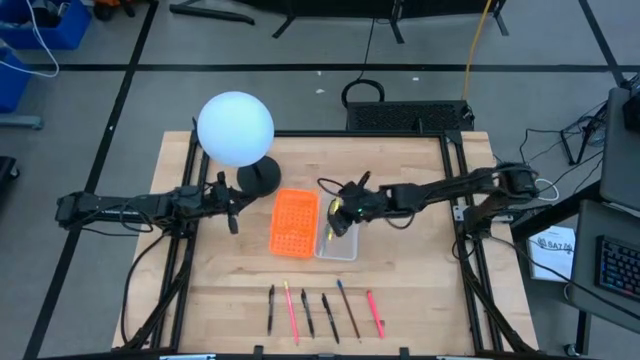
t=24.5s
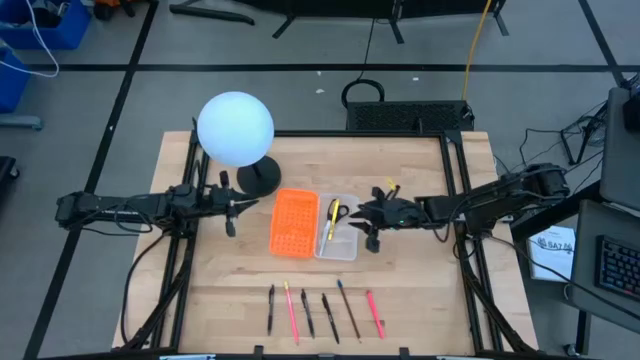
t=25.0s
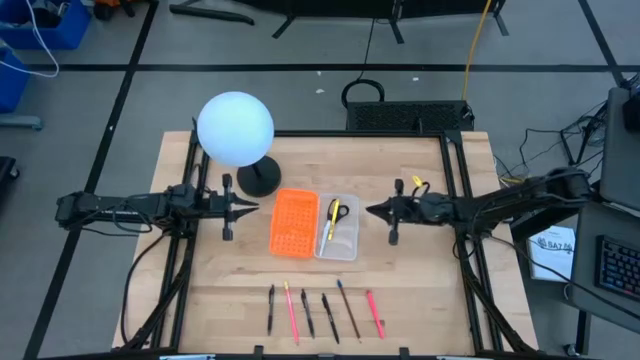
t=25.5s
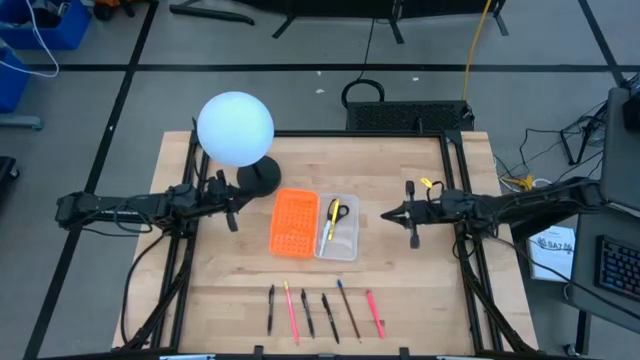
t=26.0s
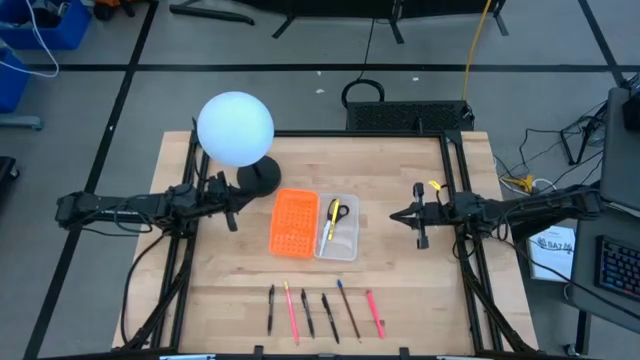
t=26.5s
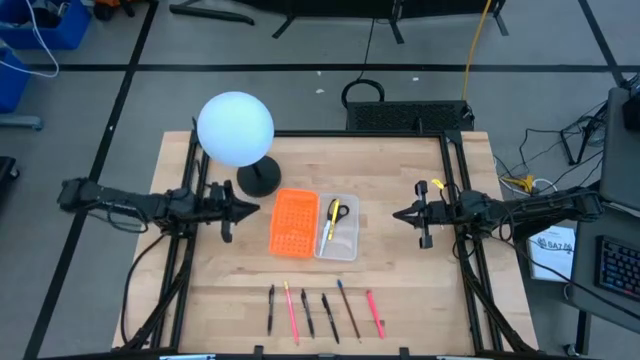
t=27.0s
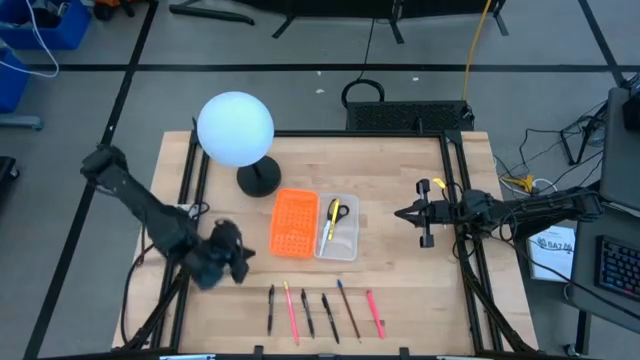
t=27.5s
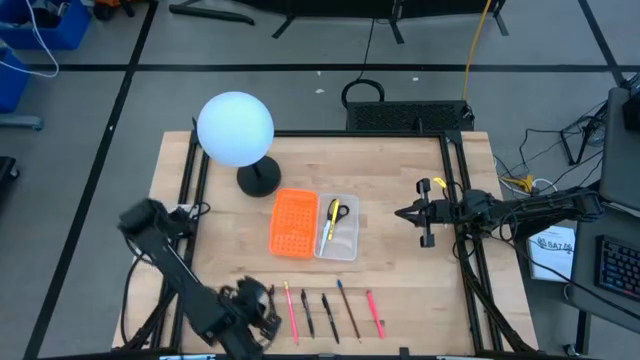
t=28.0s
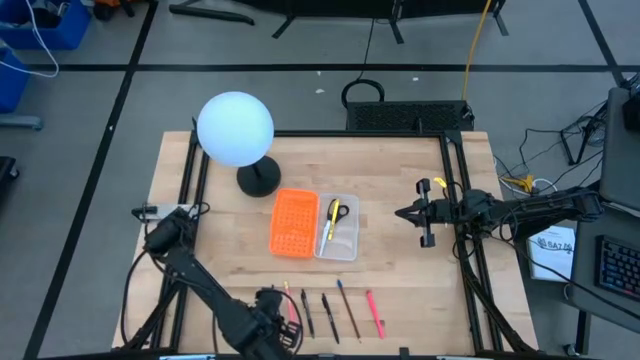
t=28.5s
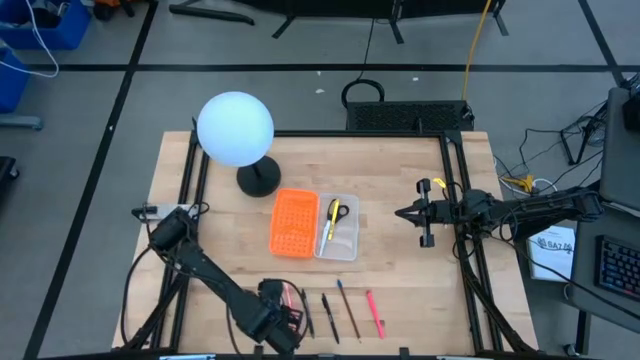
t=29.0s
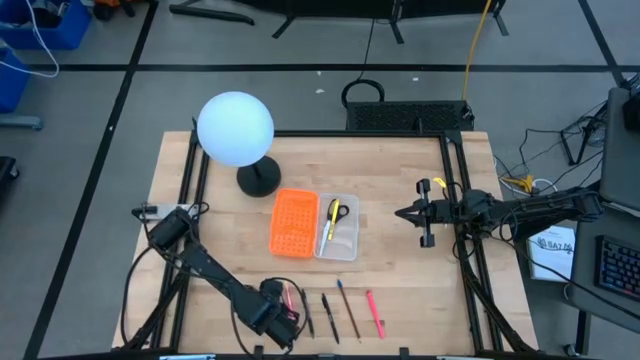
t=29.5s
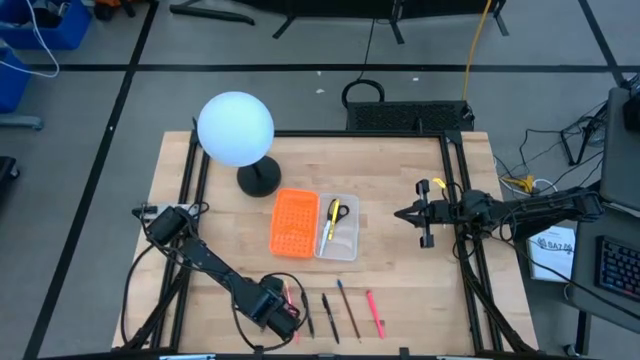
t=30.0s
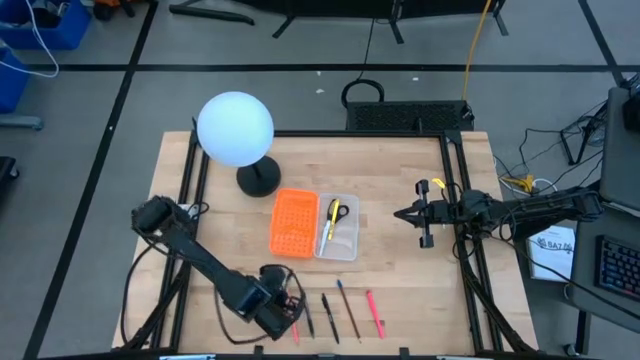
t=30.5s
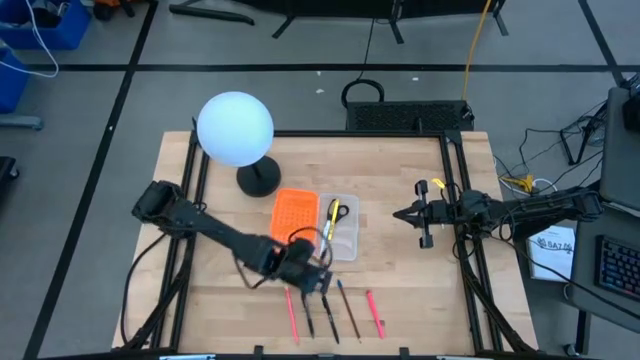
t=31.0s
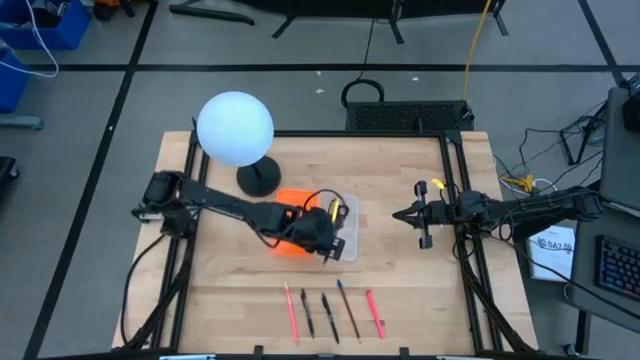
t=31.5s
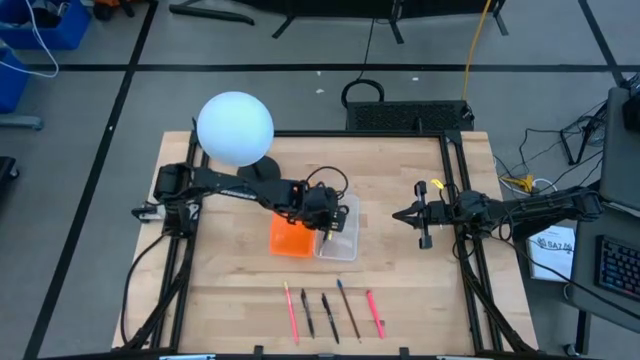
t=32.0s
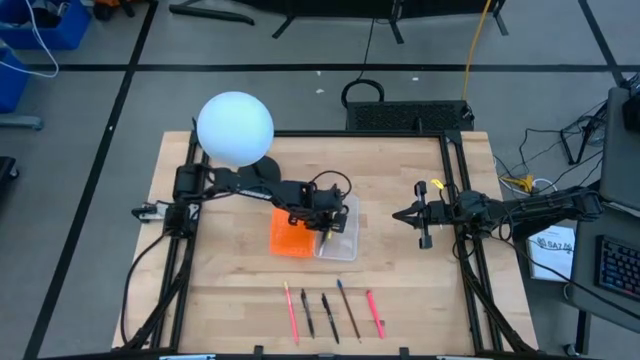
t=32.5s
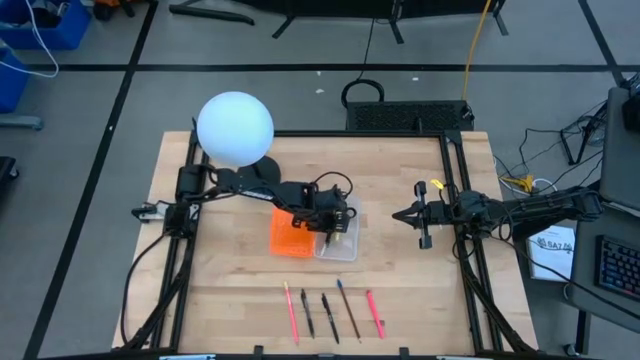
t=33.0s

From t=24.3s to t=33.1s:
Task: Pick & place school supplies into a supply box
Put the left transparent pen into the orange supply box

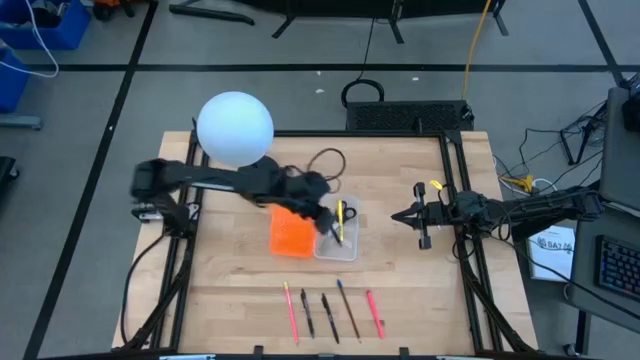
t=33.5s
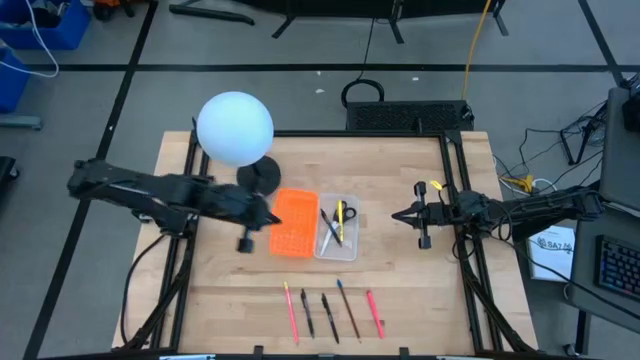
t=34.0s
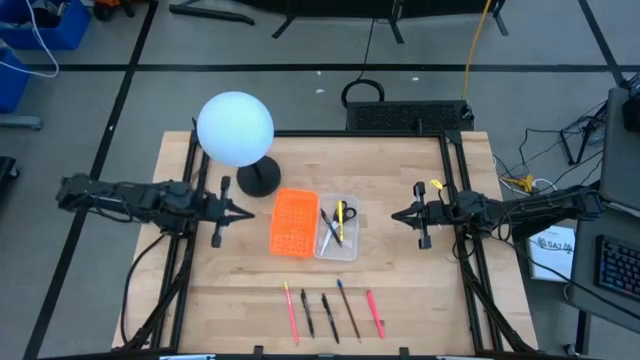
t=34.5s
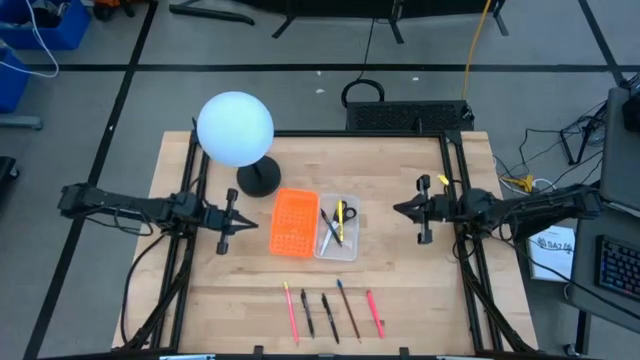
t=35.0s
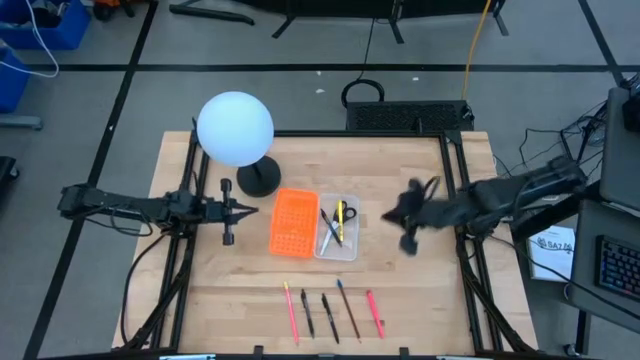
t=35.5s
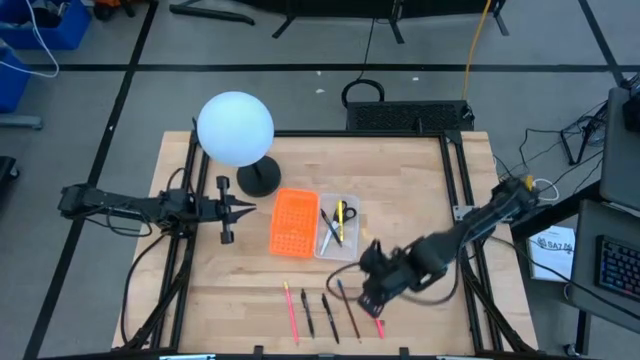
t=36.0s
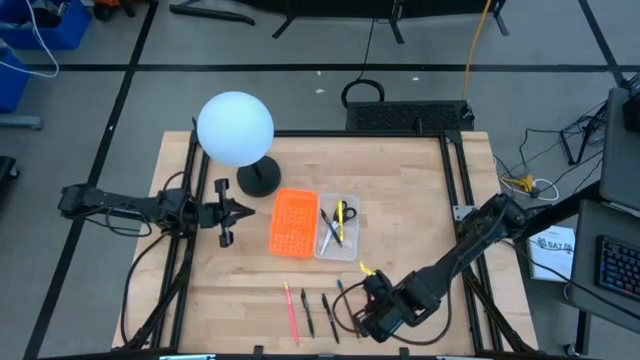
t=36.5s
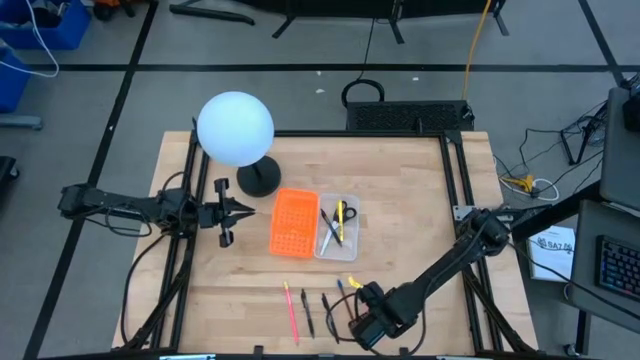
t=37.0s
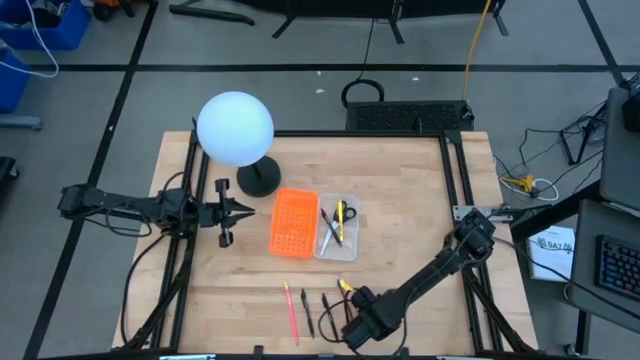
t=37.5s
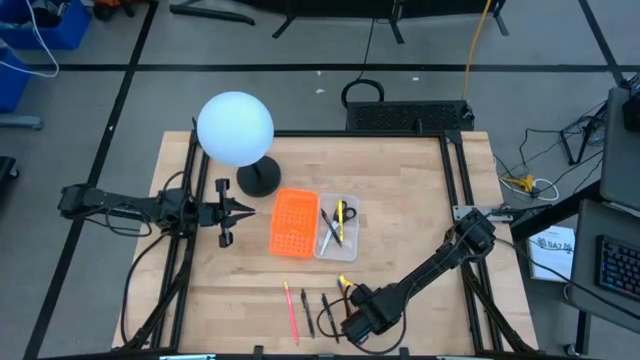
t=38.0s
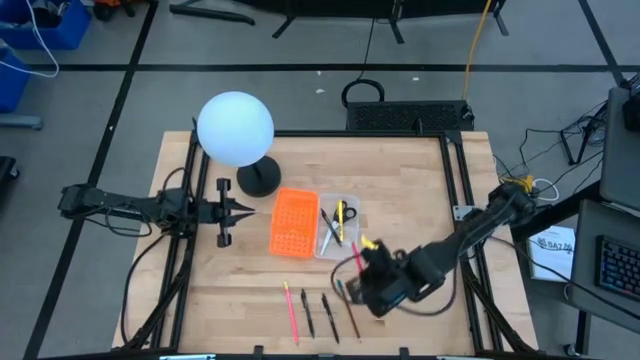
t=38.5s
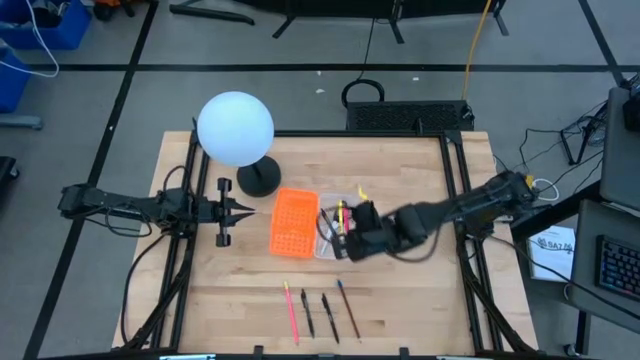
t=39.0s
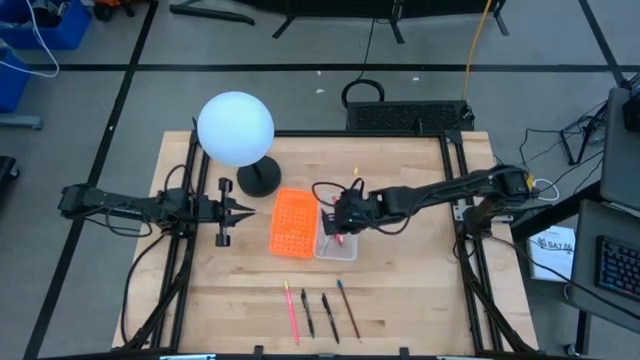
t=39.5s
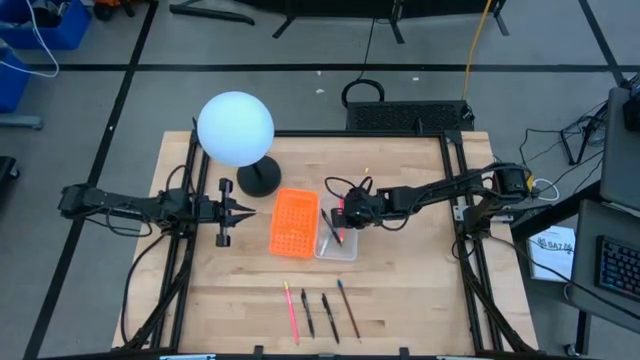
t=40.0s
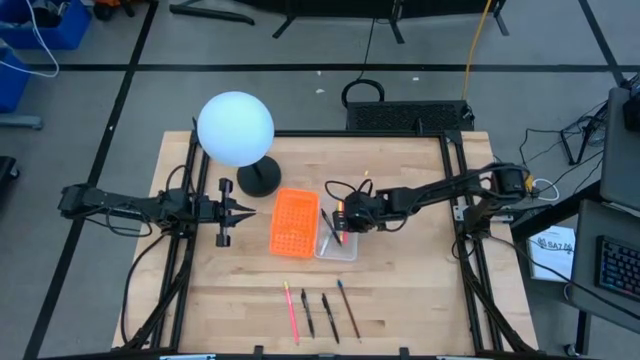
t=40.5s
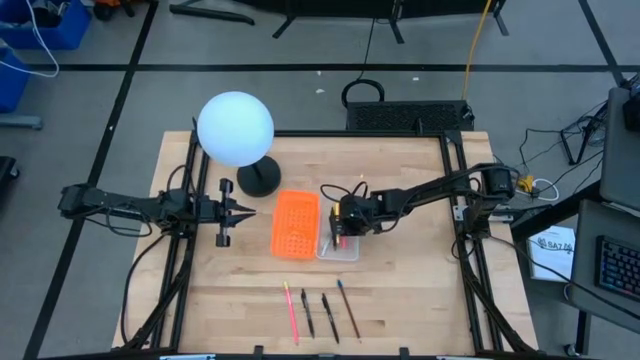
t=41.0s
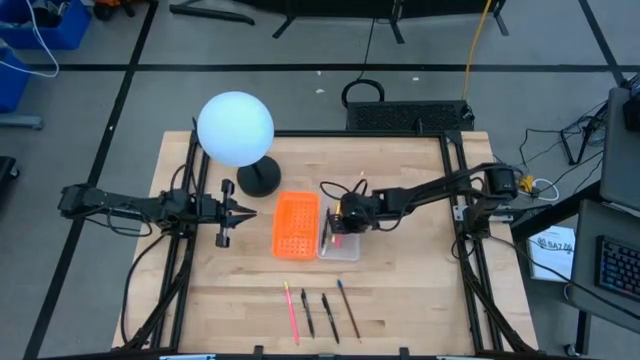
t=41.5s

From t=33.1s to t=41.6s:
Put the pink pen into the orange supply box

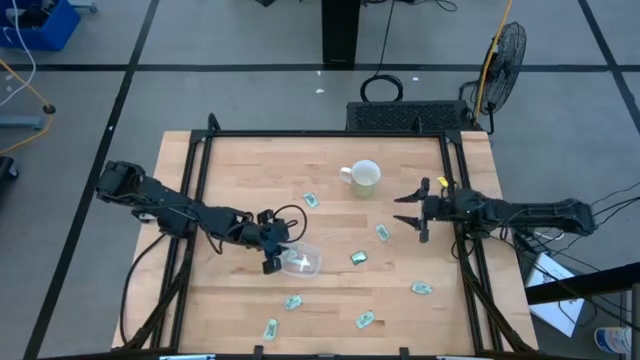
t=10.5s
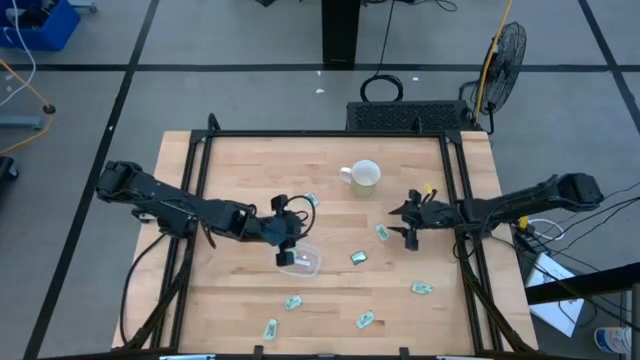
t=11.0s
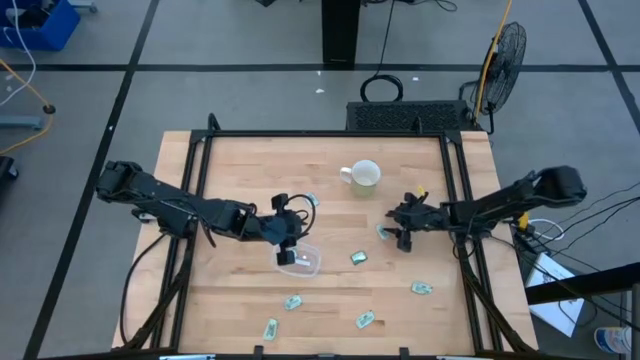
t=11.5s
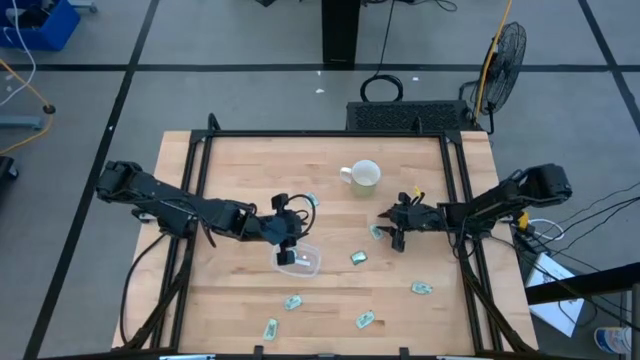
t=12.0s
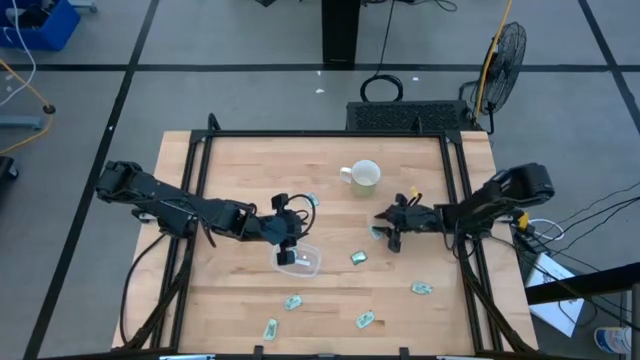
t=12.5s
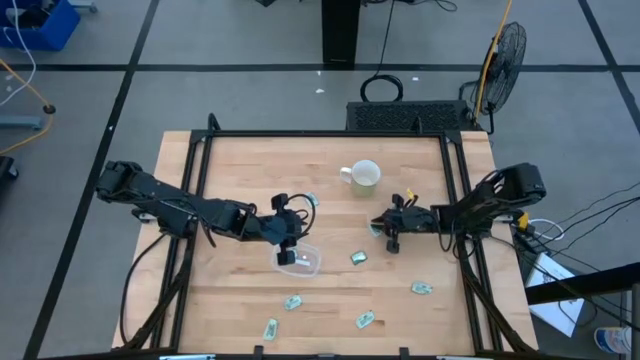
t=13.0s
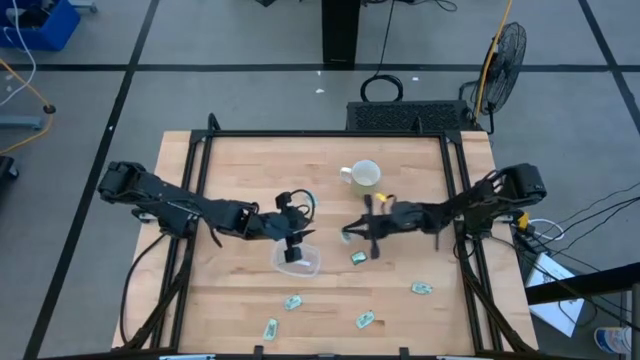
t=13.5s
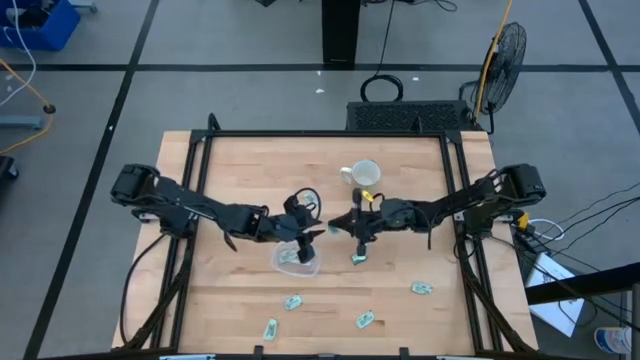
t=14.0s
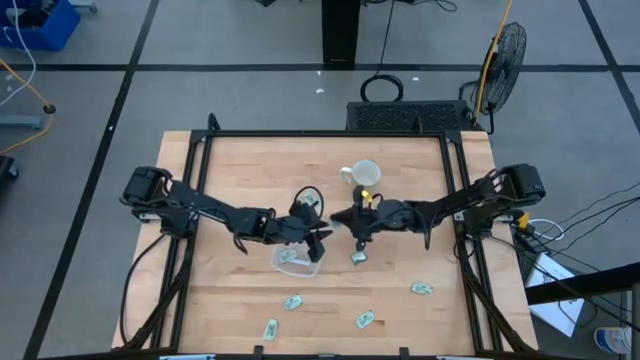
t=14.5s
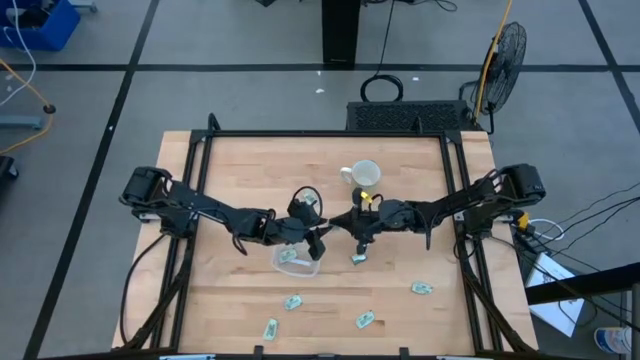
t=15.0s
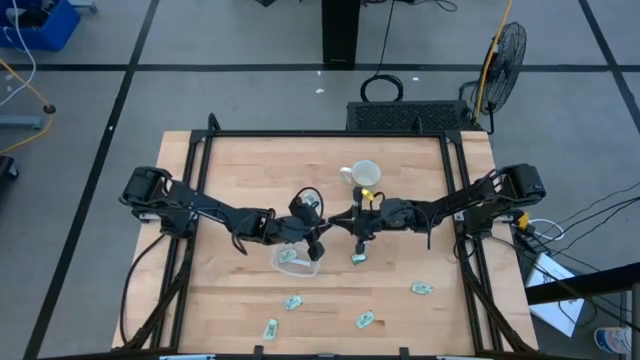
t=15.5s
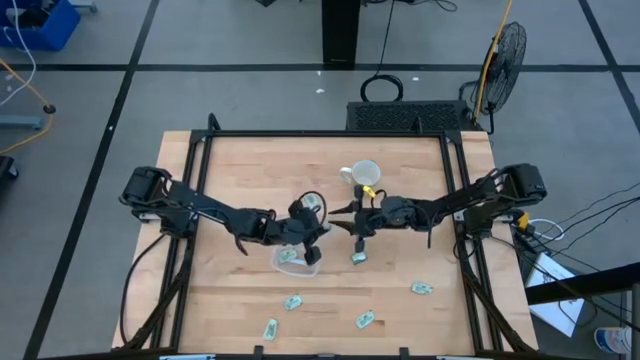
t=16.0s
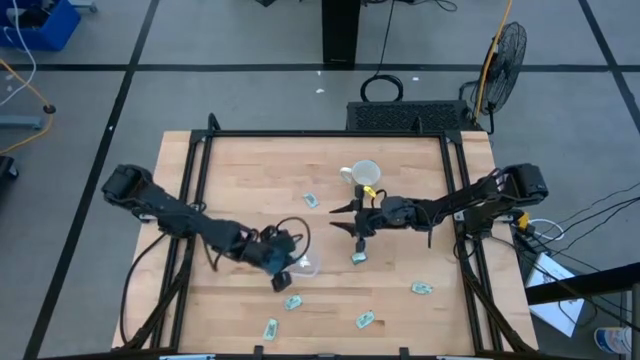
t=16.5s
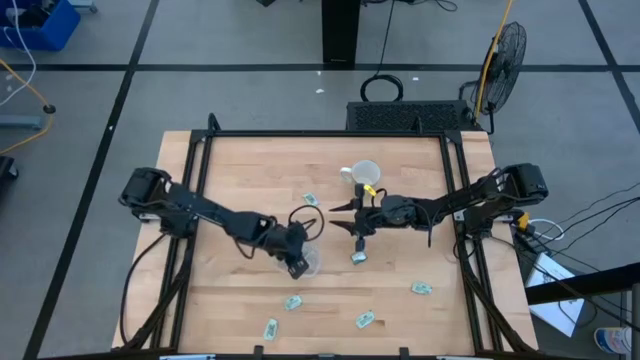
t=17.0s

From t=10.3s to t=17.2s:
Task: Pick and place Stevia / Truvia into bins
Put the light green stevia packet into the transparent bin
